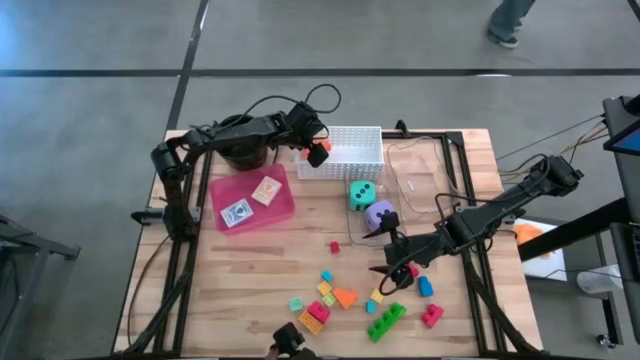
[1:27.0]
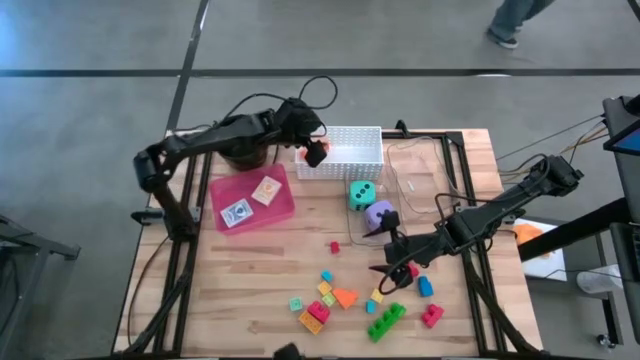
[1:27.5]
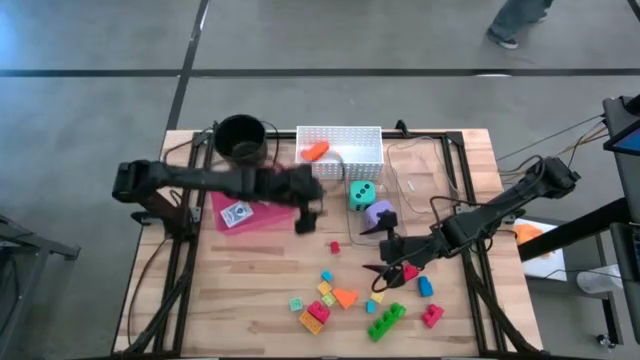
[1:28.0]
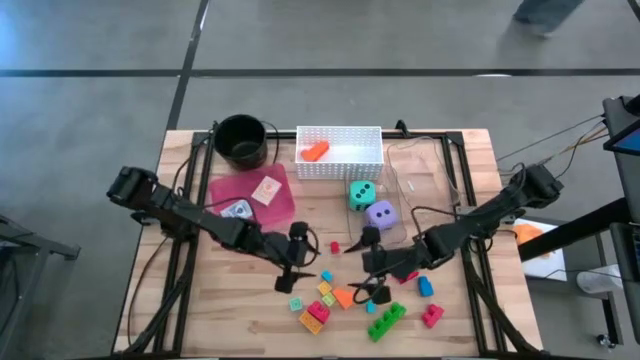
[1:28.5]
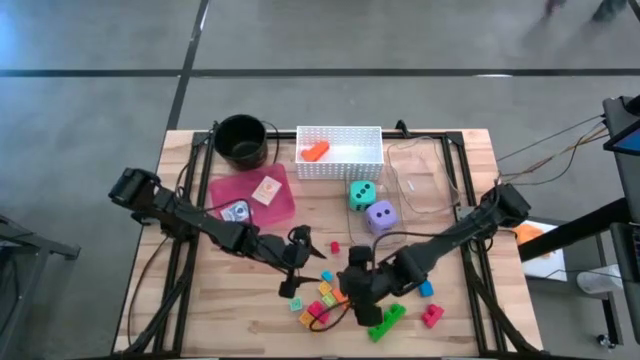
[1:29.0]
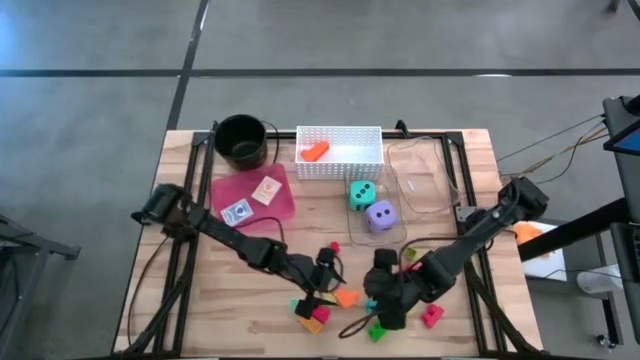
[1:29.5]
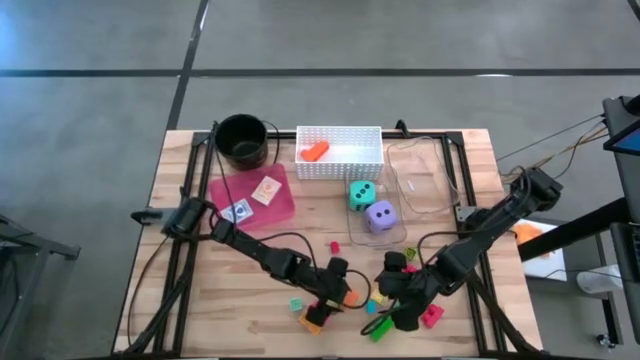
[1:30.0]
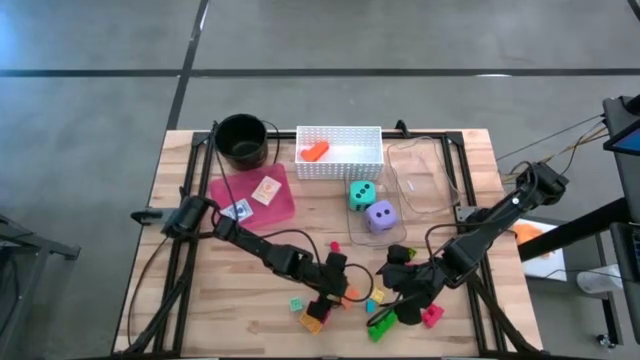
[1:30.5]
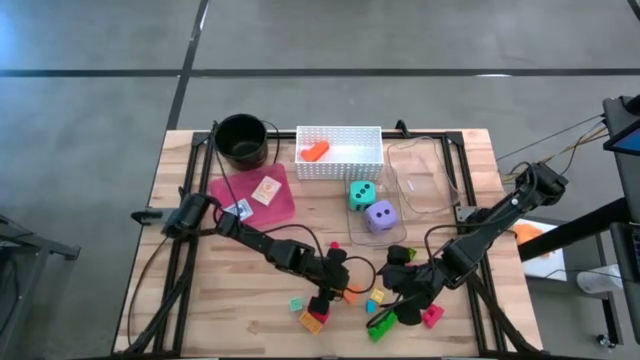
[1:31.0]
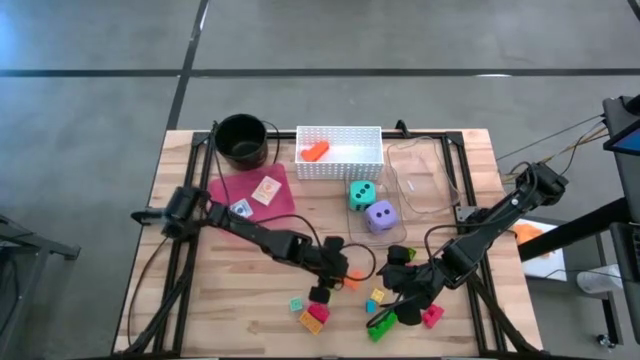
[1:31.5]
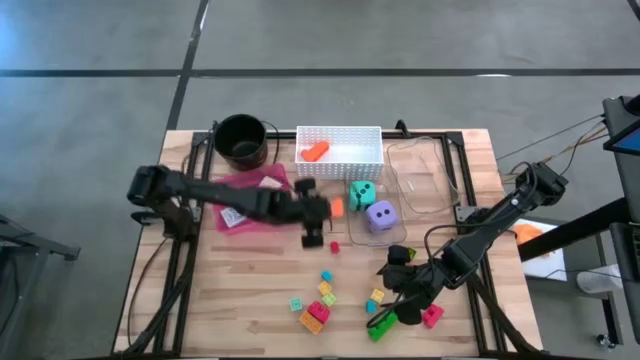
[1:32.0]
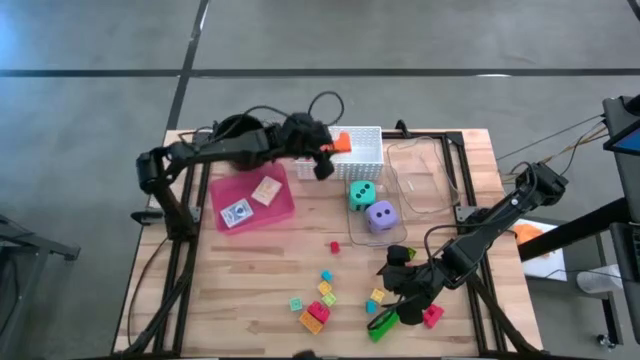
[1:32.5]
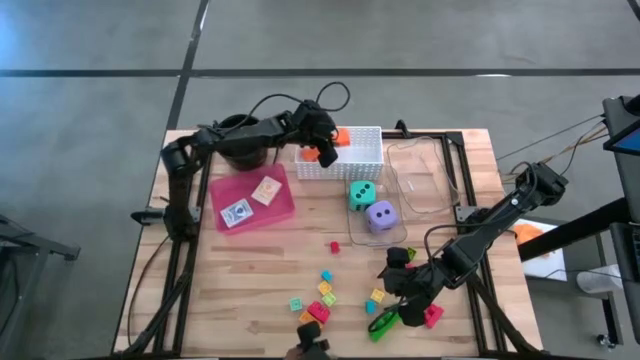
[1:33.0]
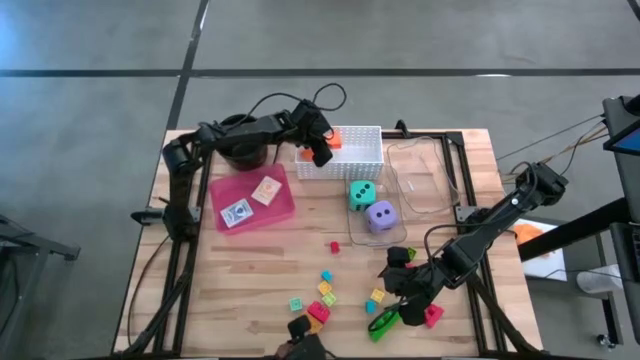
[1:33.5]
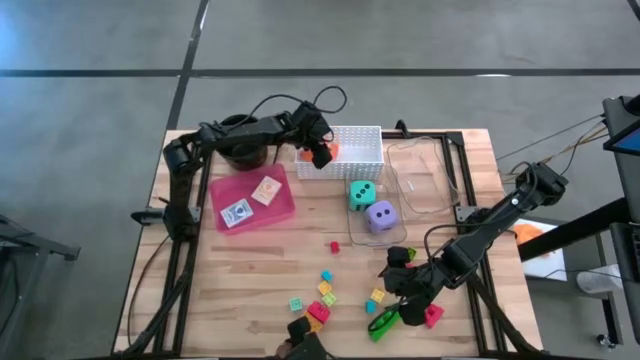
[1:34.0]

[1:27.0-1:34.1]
Task: Pick & Place Toys
Put the big orange game piece into the white bin

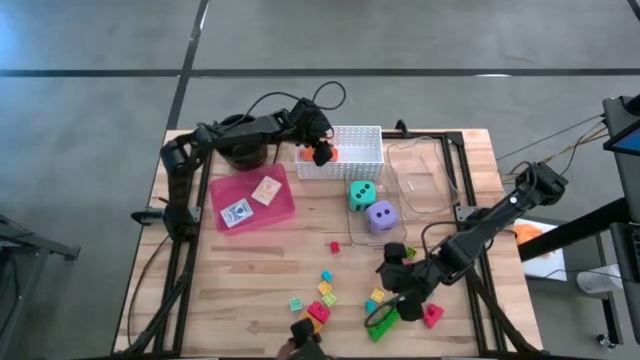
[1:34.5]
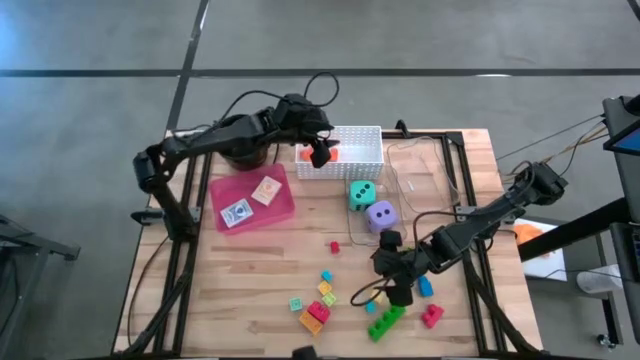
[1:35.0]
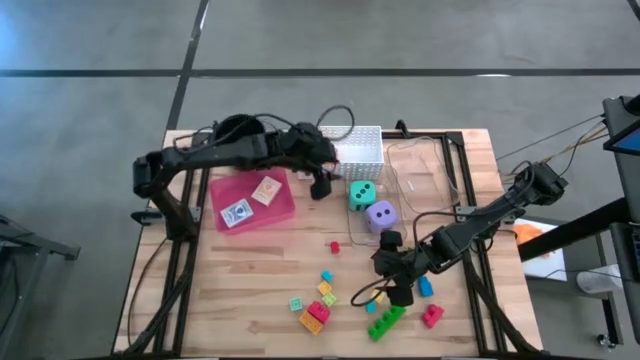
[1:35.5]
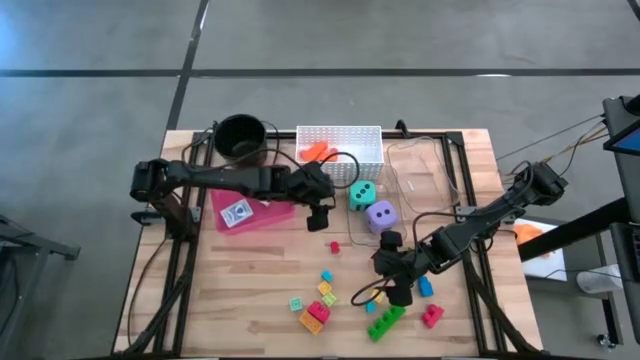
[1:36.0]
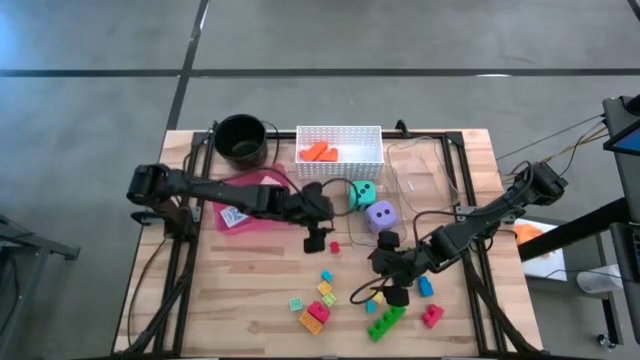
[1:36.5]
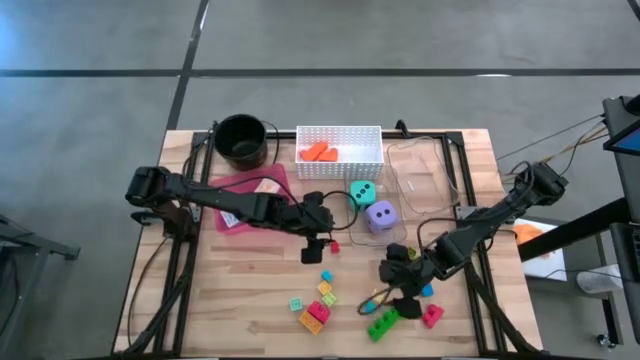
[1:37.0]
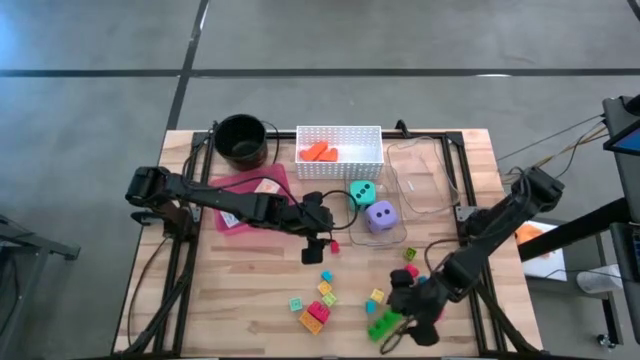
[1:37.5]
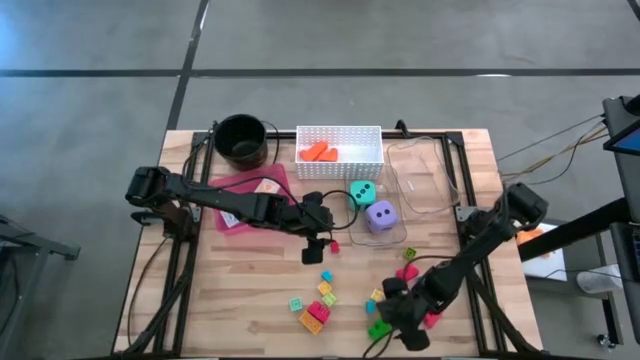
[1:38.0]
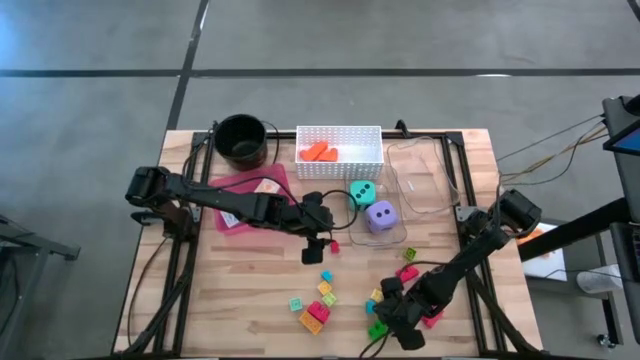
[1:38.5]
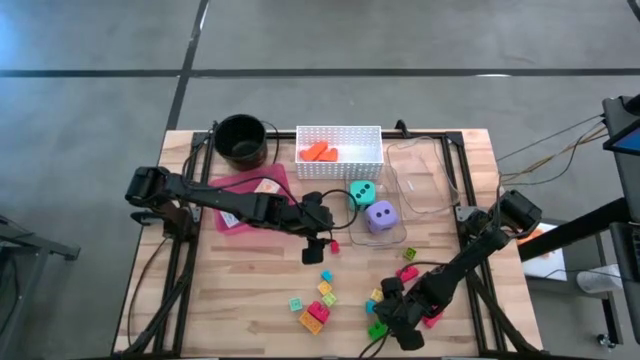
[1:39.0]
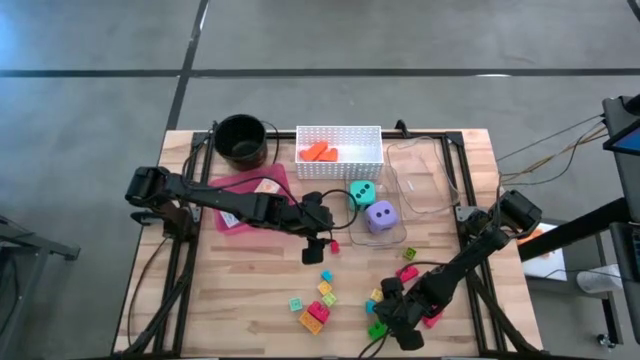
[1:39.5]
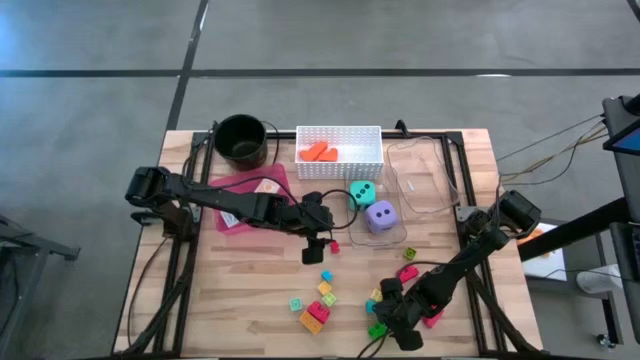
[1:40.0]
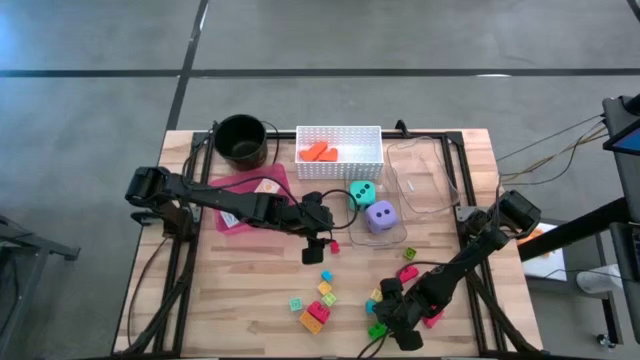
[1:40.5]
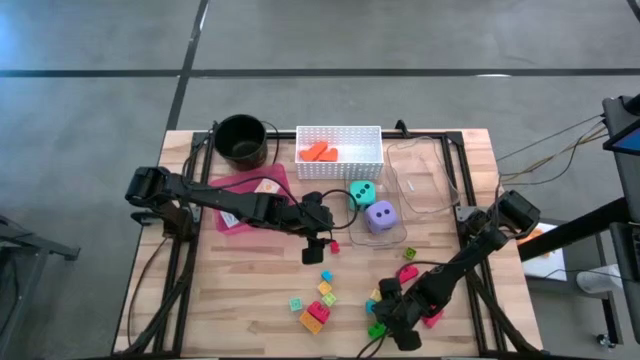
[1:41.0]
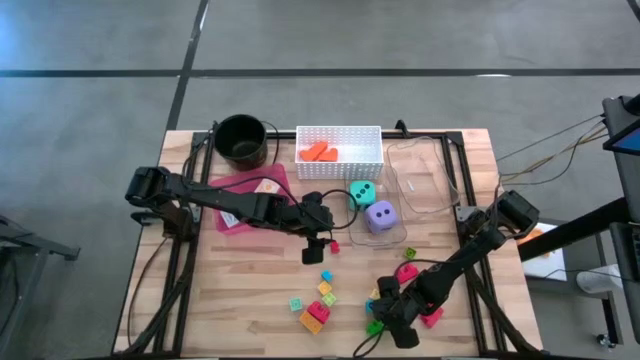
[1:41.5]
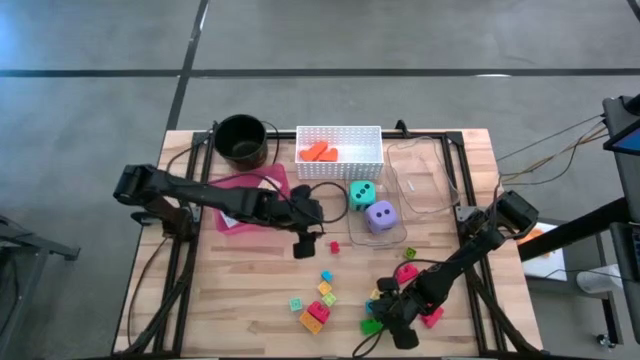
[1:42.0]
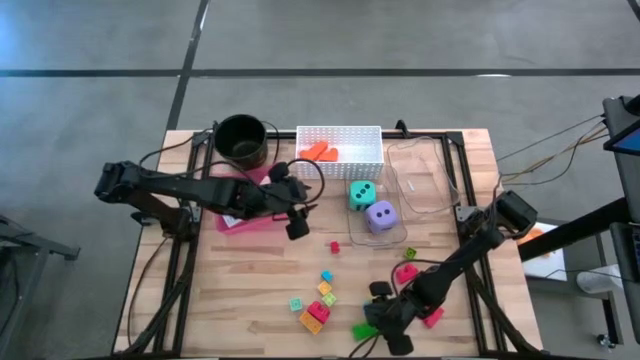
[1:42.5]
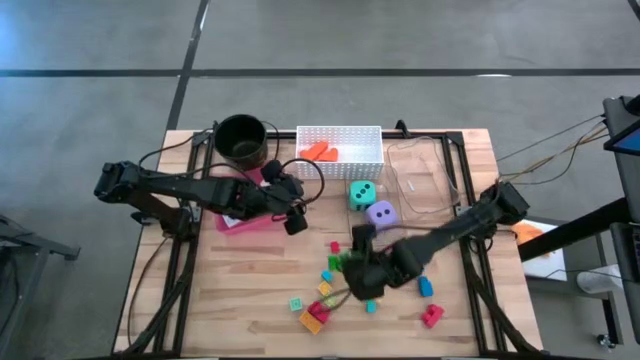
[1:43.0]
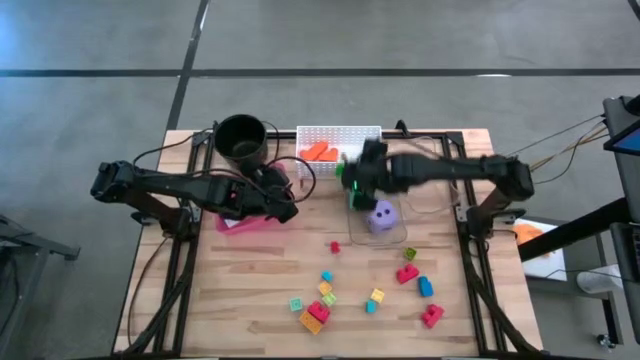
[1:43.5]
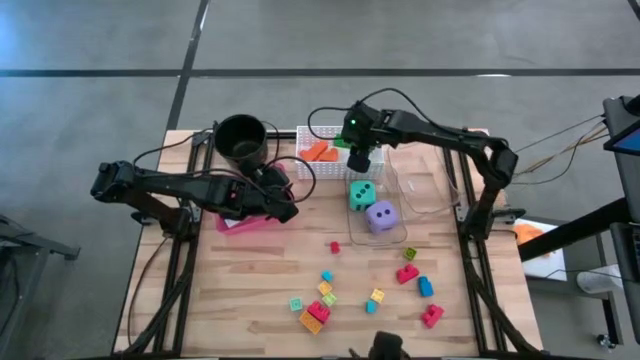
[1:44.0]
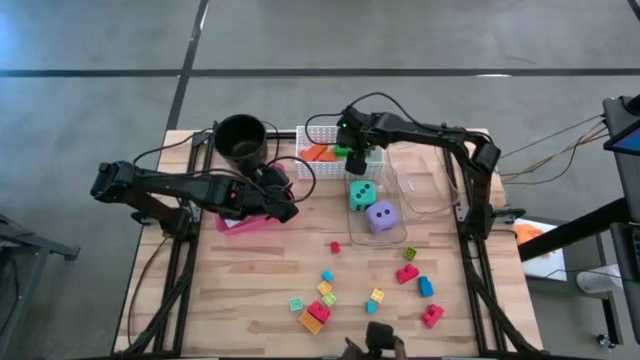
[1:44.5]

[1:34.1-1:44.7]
Put the big green game piece into the white bin
